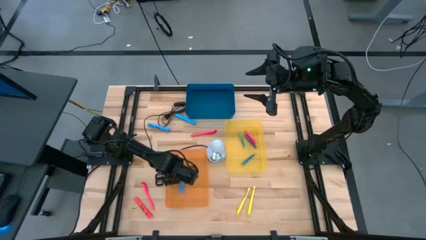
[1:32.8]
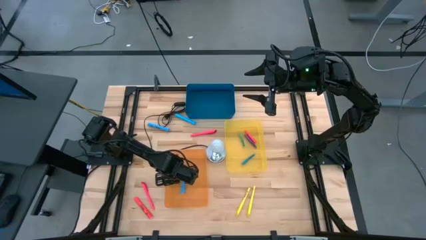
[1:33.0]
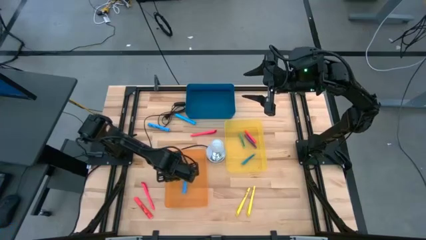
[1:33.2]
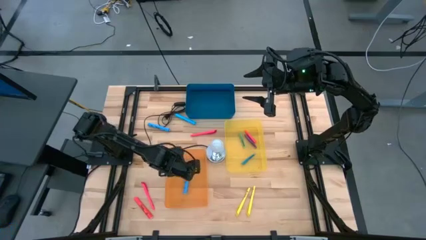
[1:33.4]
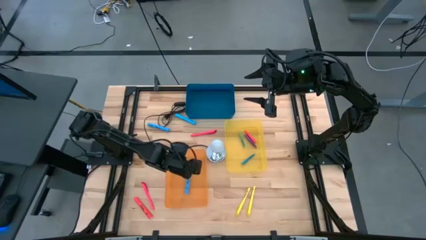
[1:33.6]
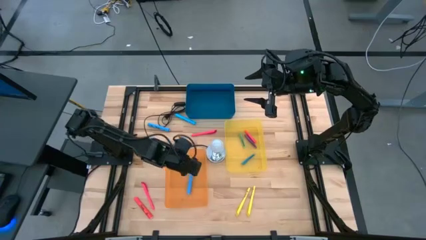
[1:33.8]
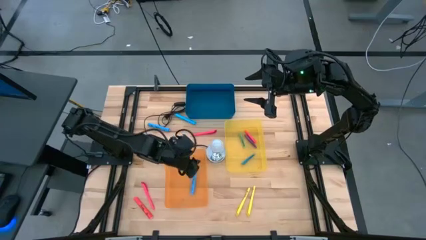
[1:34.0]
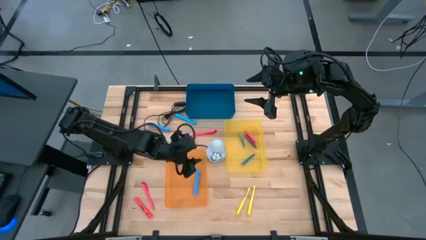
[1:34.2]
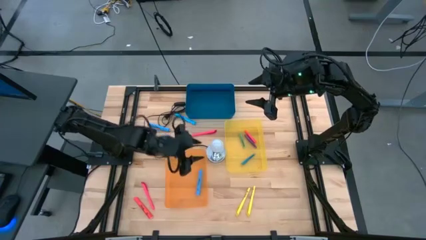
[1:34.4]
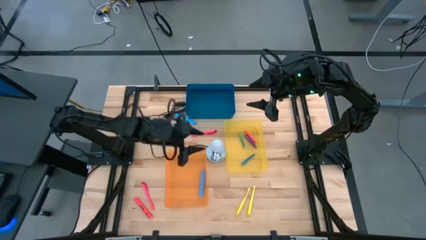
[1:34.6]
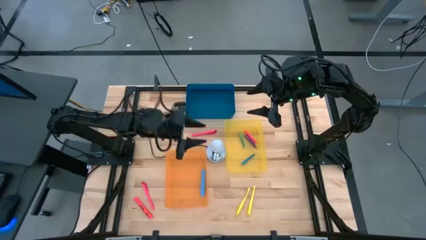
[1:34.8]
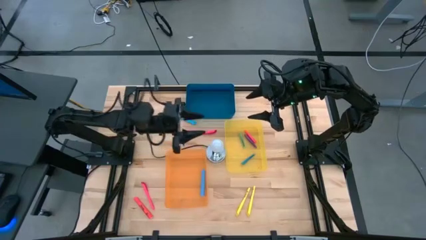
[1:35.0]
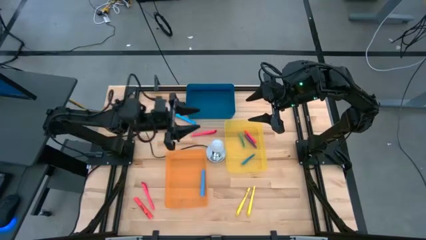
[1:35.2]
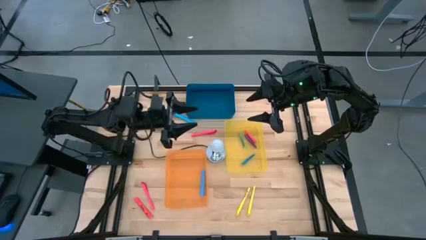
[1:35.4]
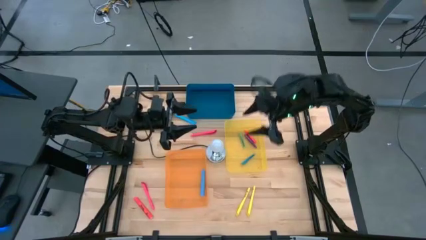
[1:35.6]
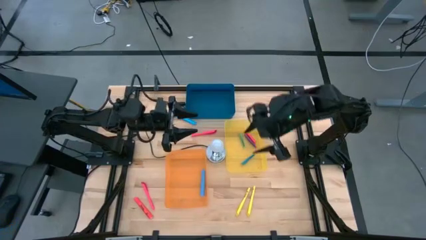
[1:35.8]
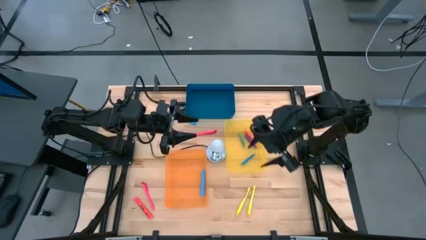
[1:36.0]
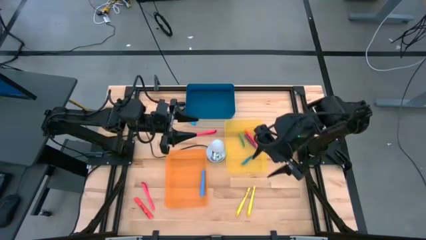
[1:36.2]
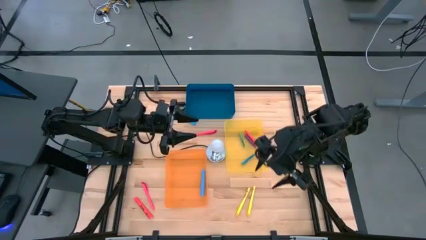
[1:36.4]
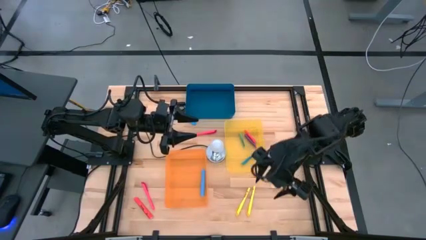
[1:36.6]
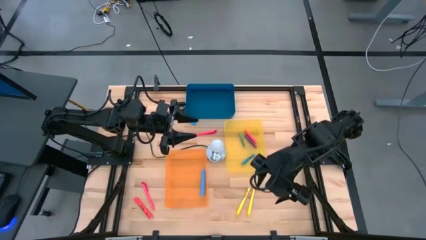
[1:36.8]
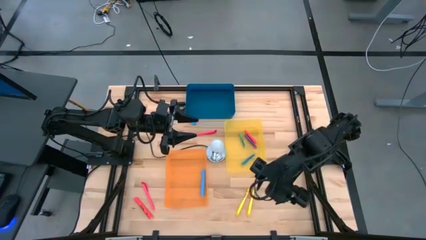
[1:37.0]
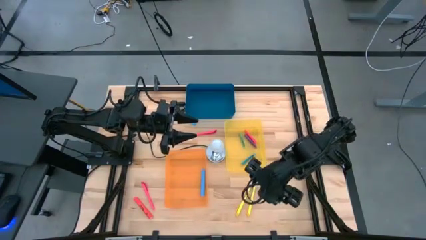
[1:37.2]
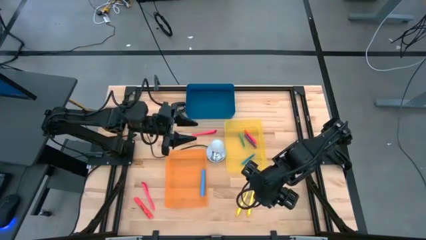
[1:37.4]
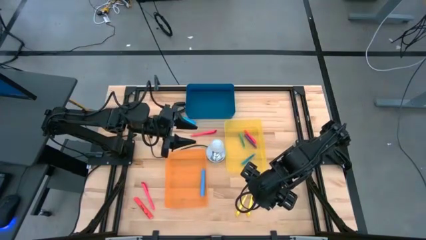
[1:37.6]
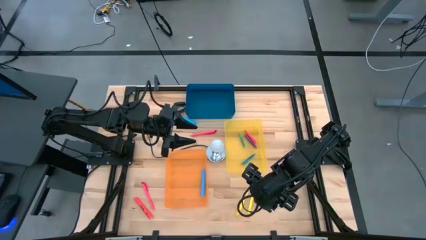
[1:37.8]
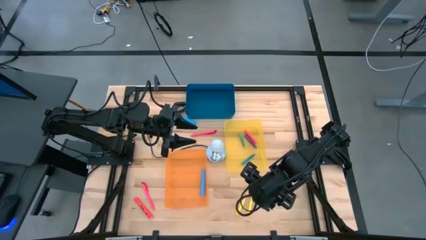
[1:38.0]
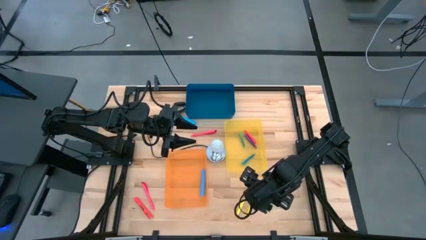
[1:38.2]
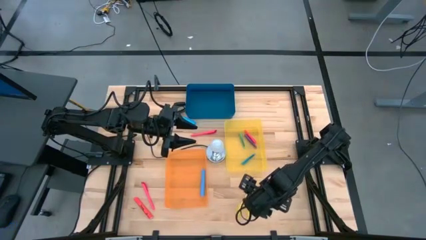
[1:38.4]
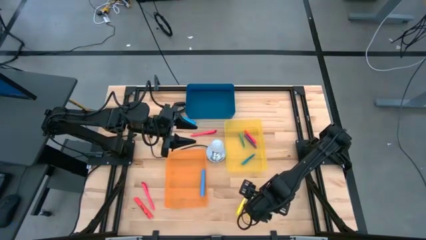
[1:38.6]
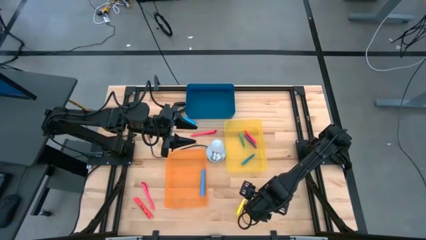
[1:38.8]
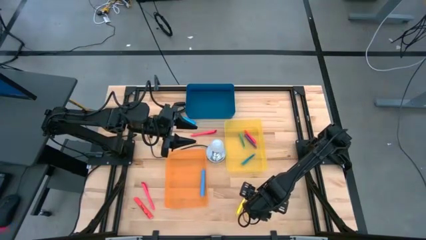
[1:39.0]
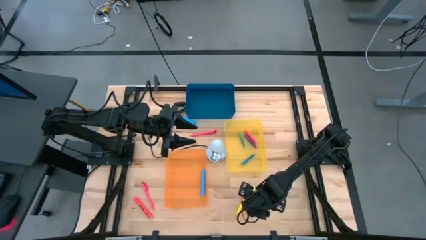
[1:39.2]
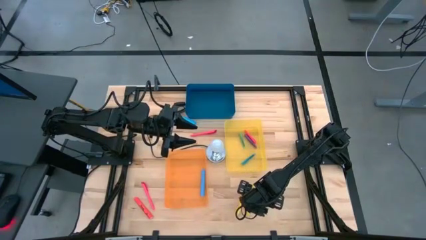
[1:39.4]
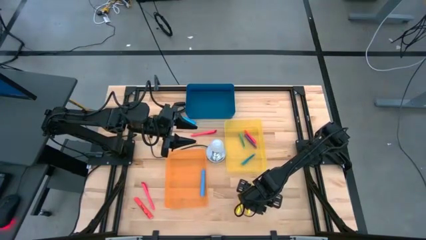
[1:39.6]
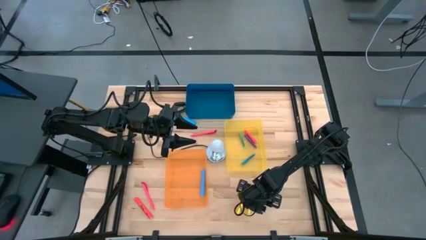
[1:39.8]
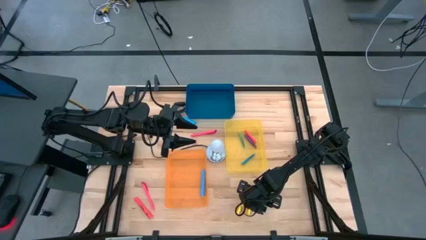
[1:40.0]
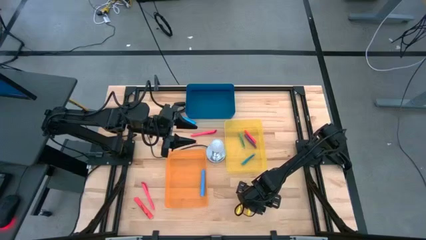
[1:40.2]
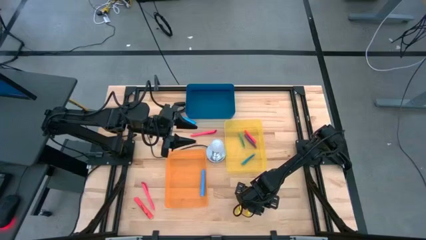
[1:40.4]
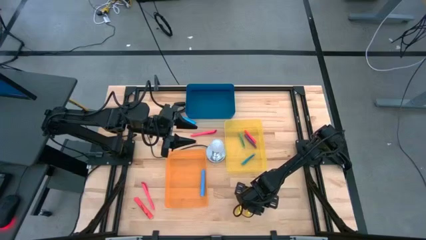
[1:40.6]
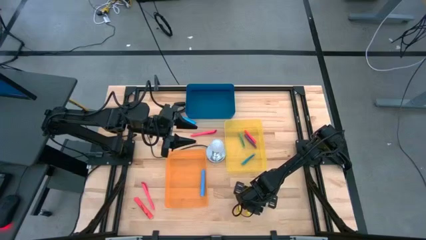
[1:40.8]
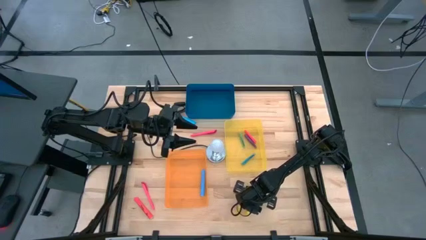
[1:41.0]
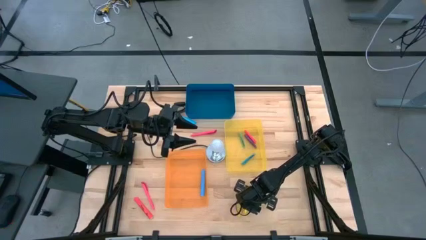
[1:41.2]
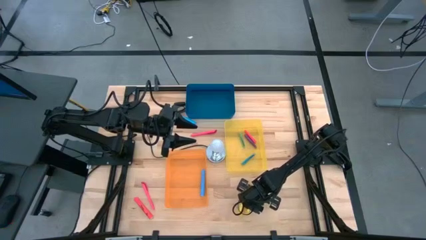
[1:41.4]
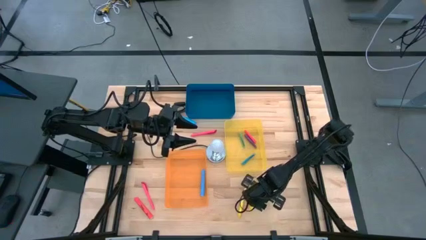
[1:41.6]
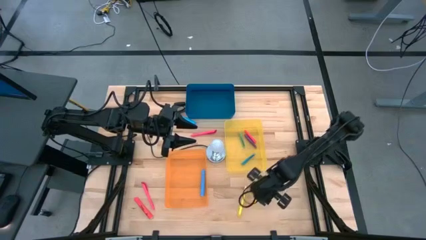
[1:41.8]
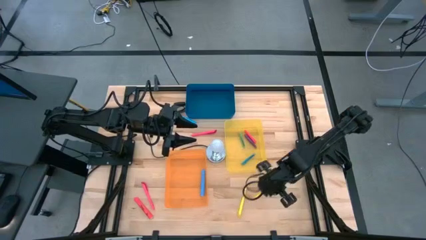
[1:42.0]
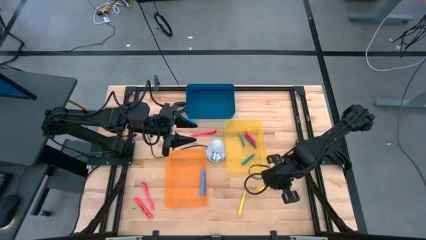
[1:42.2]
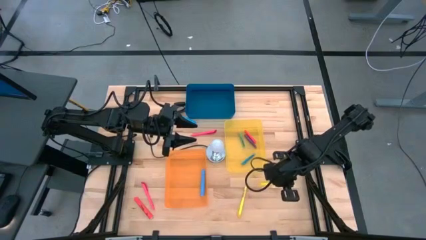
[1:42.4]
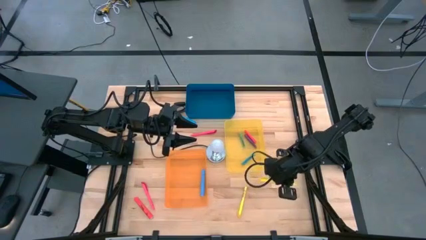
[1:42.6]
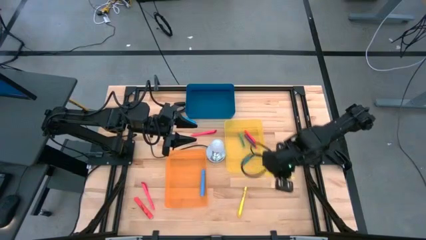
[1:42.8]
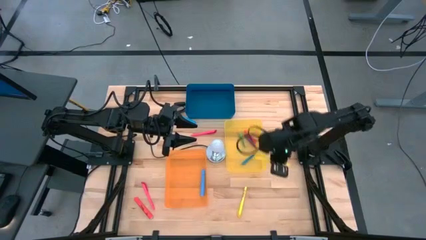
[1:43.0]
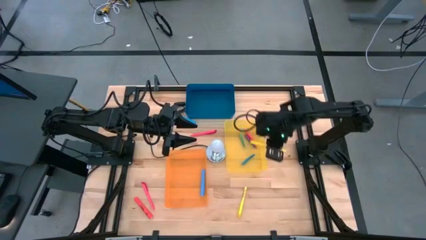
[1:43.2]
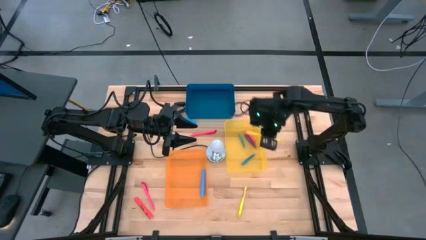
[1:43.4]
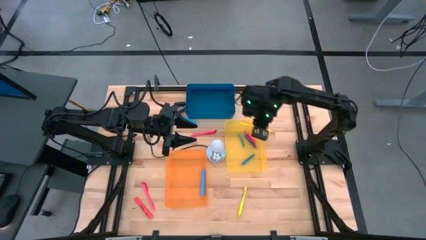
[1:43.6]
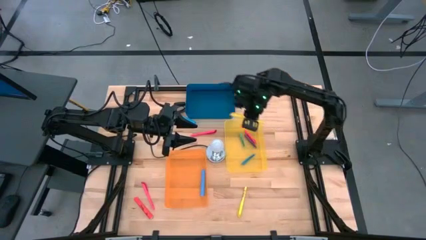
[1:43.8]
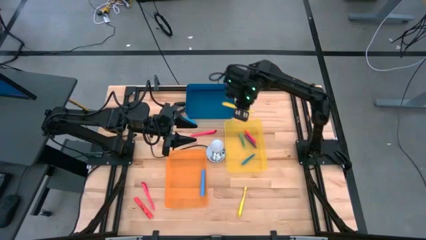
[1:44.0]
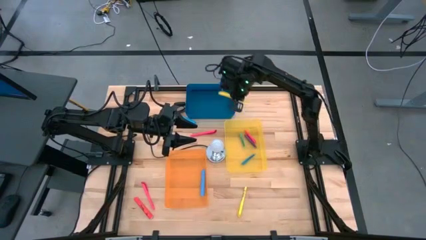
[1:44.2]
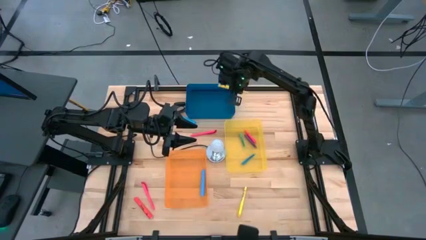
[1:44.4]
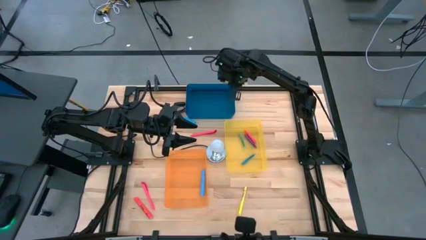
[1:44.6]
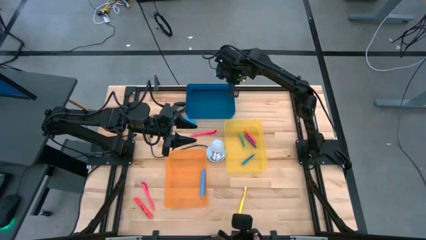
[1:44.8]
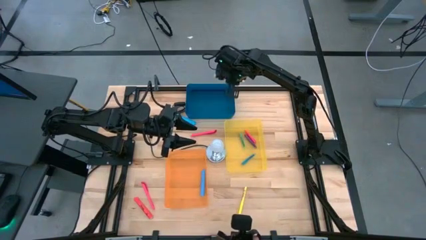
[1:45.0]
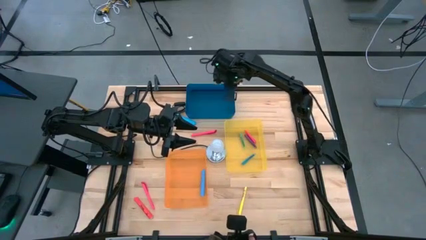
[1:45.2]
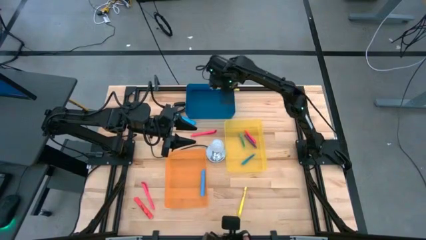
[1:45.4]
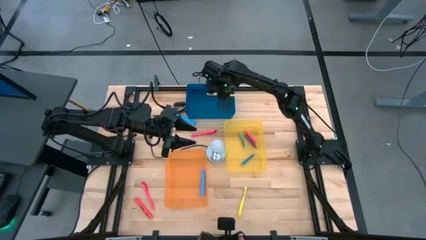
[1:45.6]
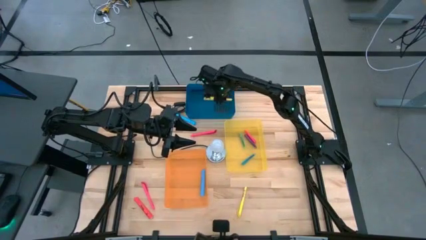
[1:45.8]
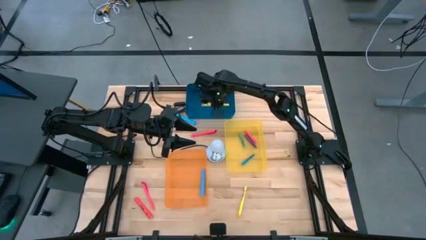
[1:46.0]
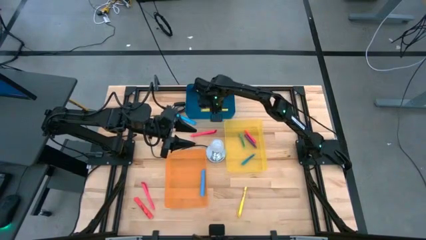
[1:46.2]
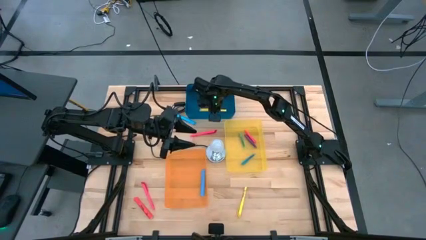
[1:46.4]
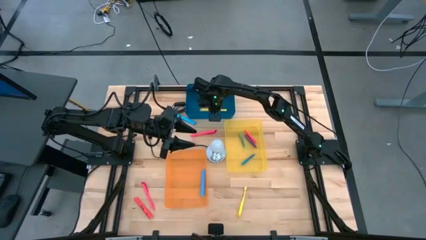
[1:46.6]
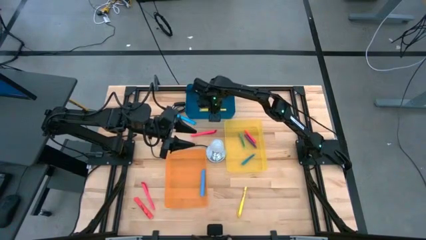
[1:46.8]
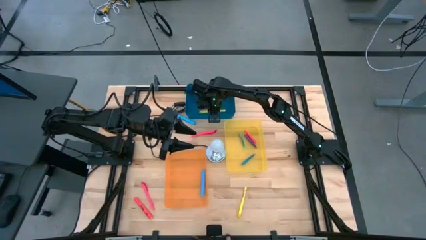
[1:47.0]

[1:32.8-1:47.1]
Task: Pick & Place Markers
Put the right yellow pen into the blue bin
